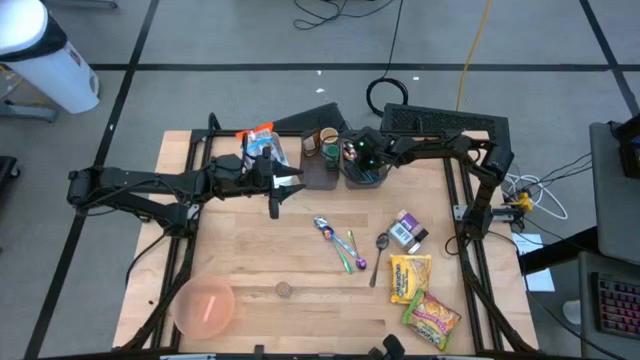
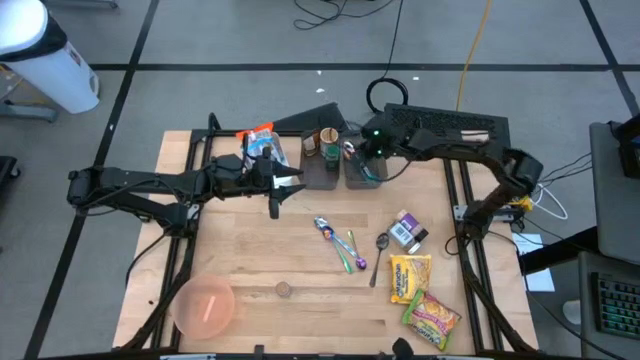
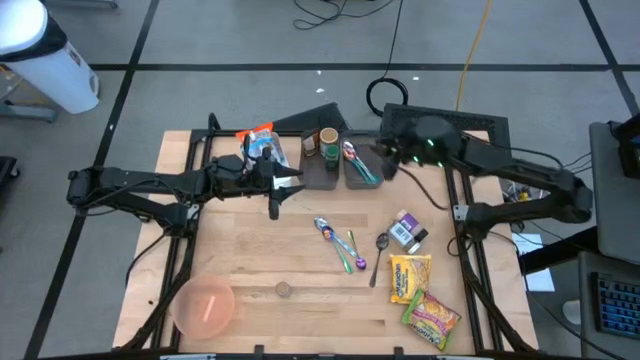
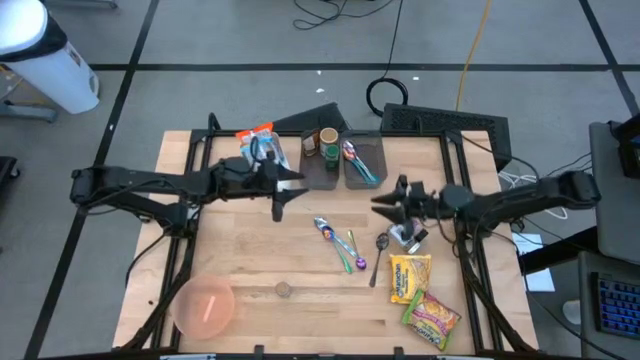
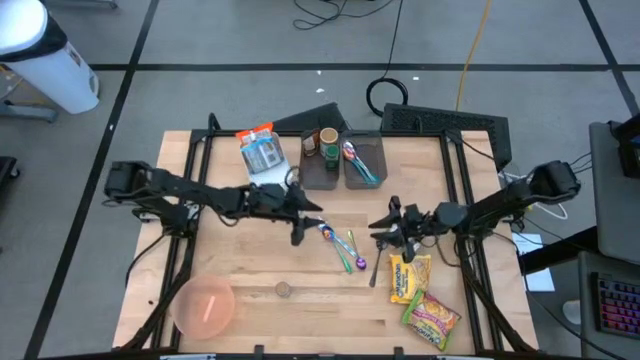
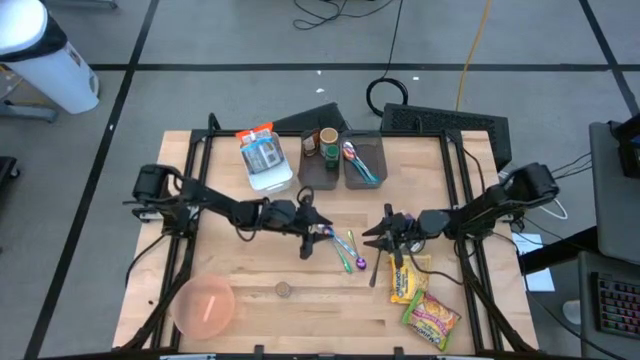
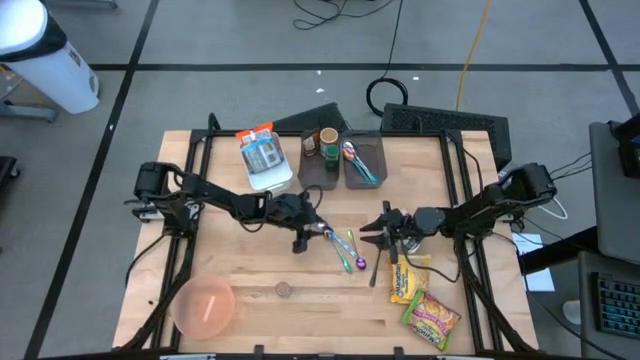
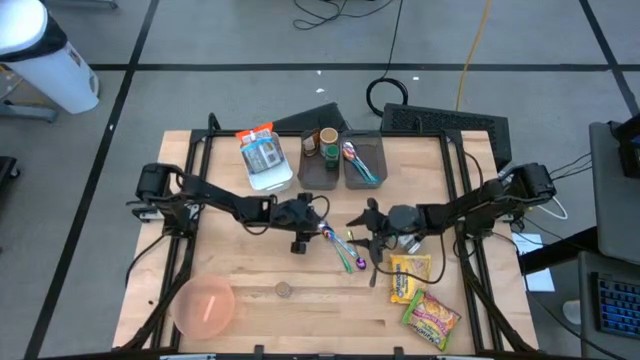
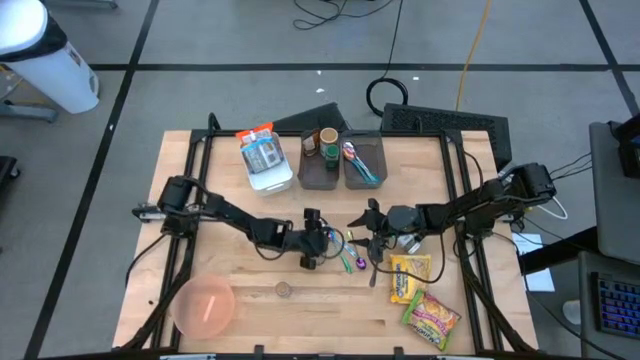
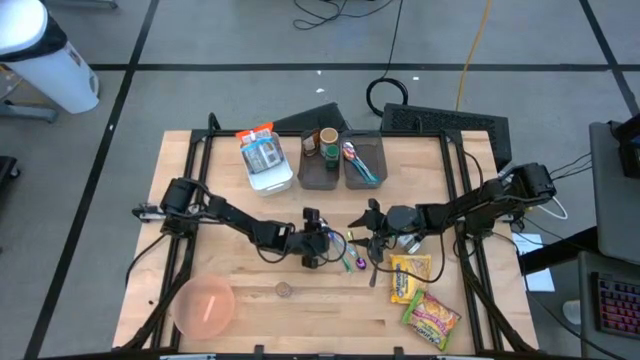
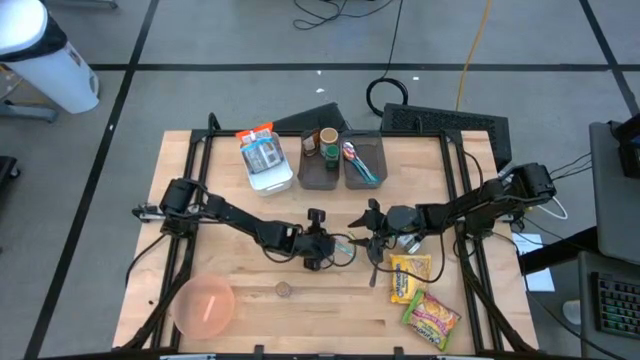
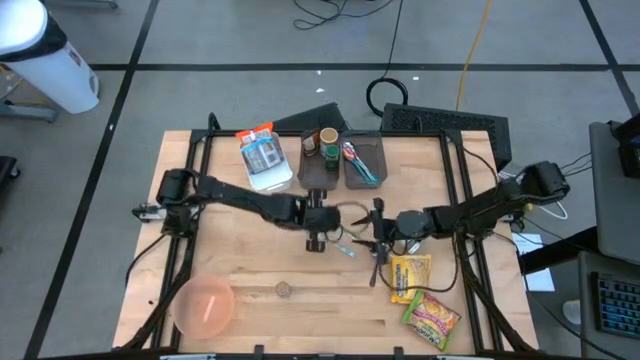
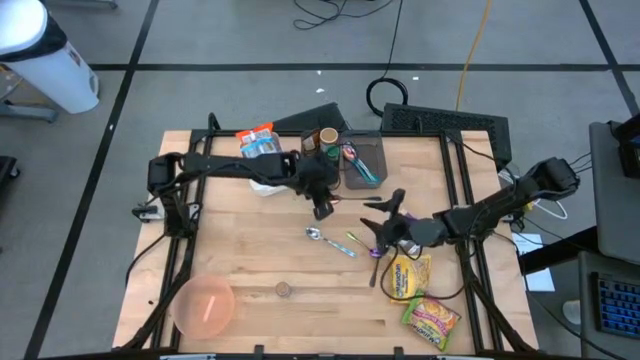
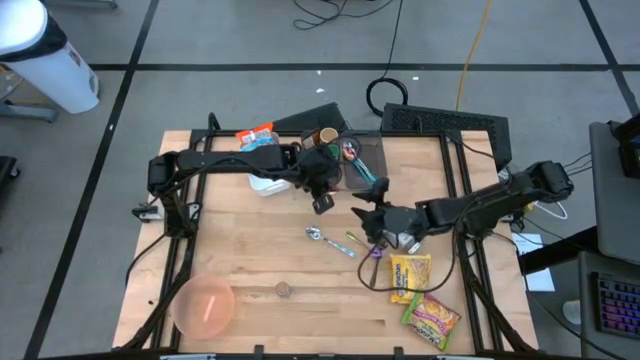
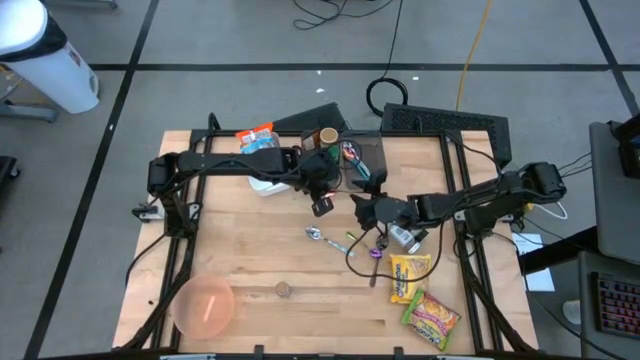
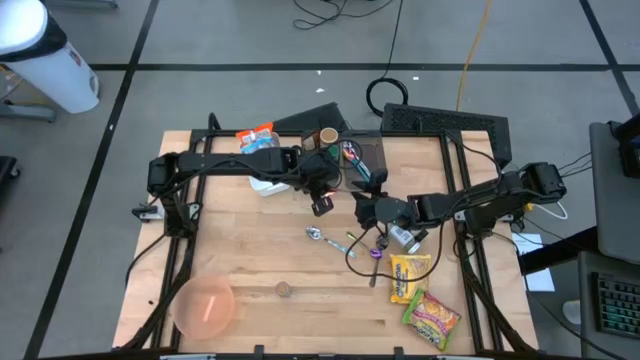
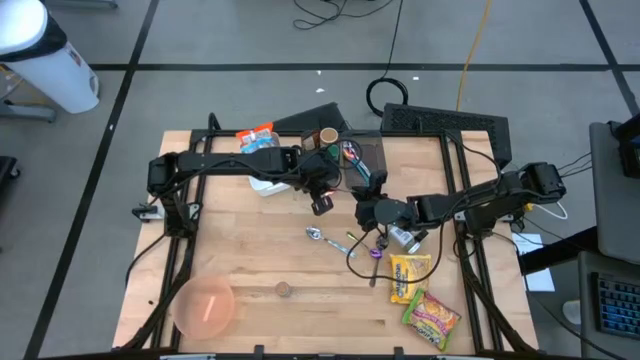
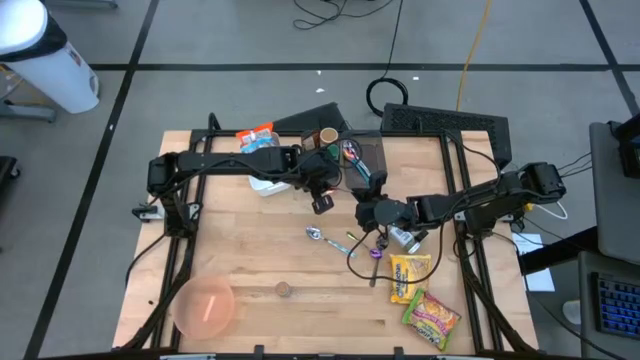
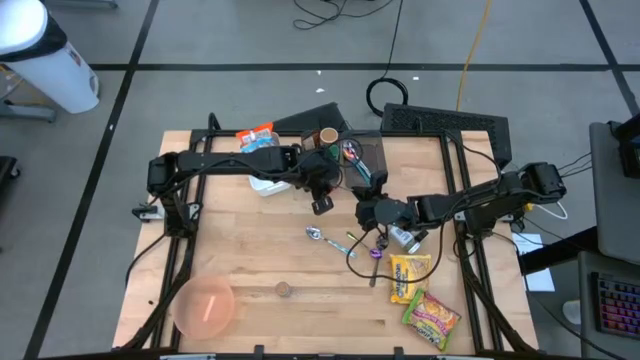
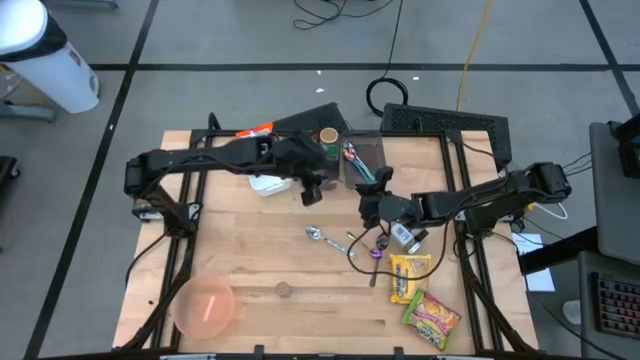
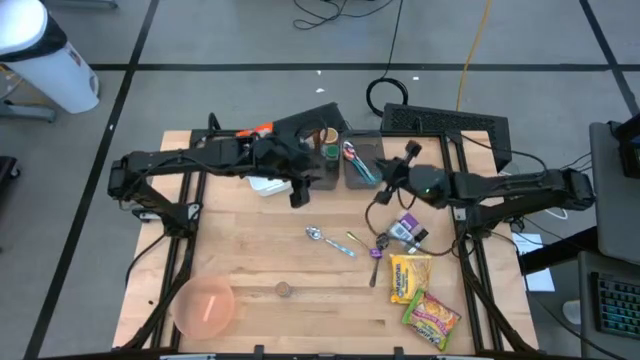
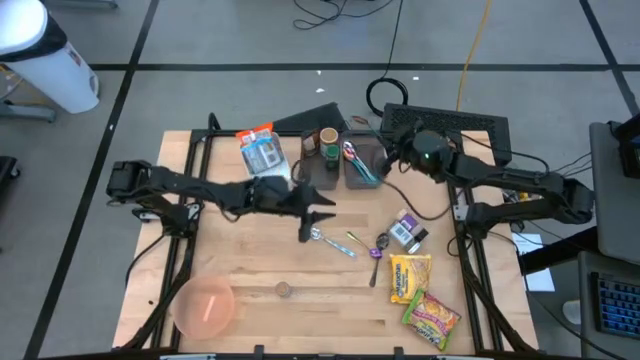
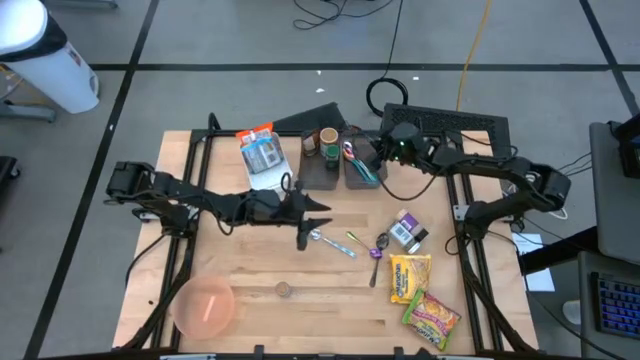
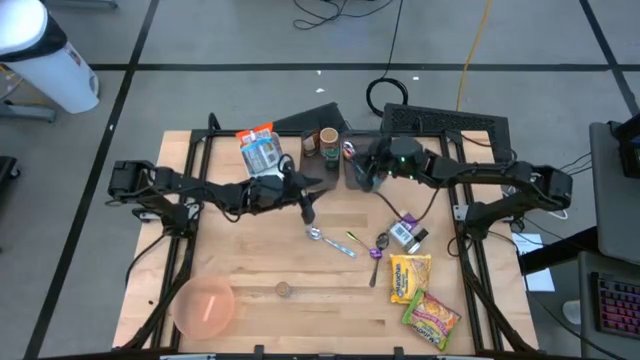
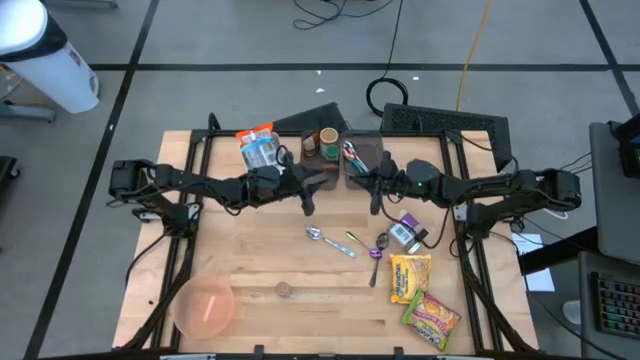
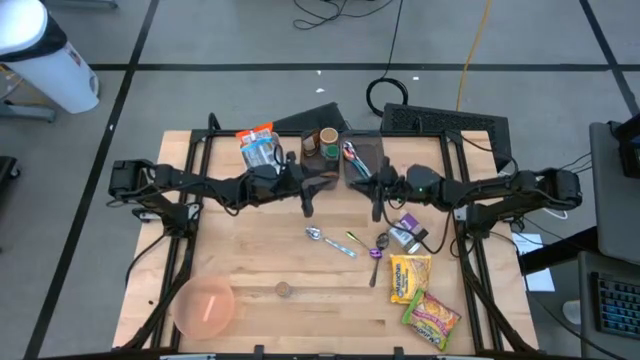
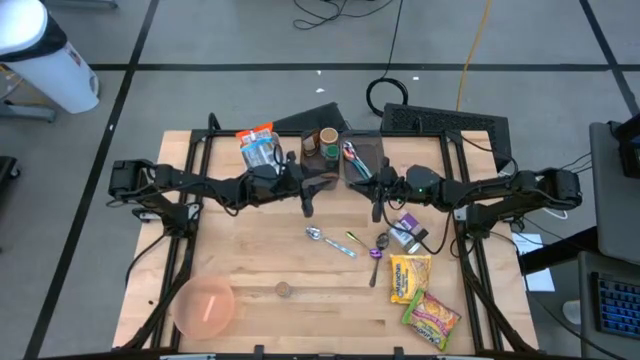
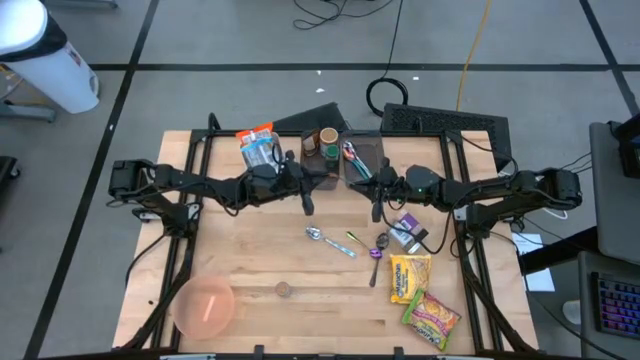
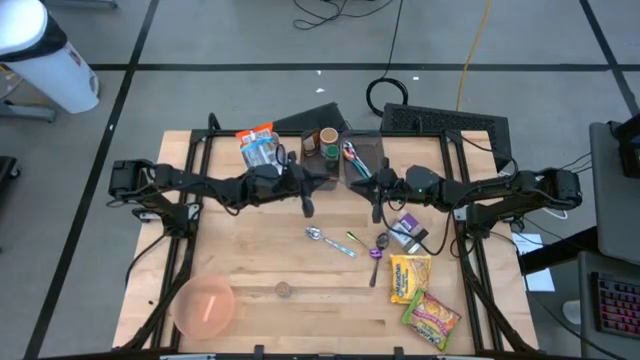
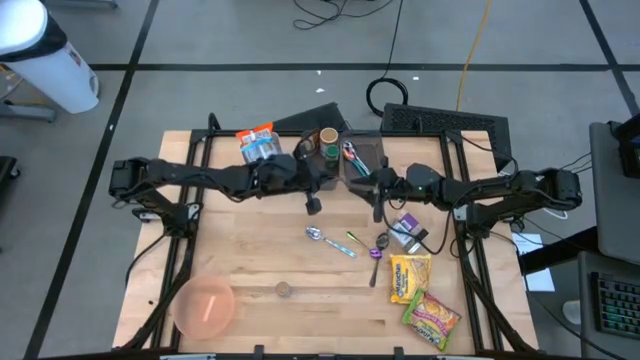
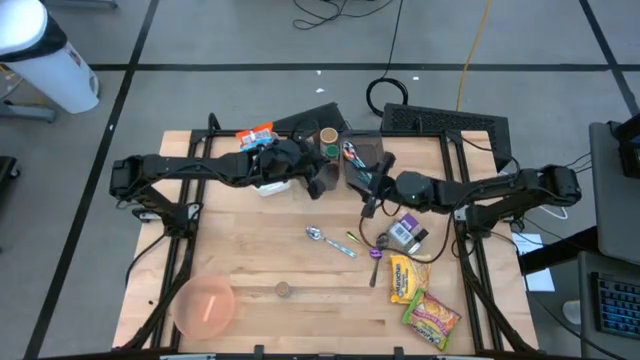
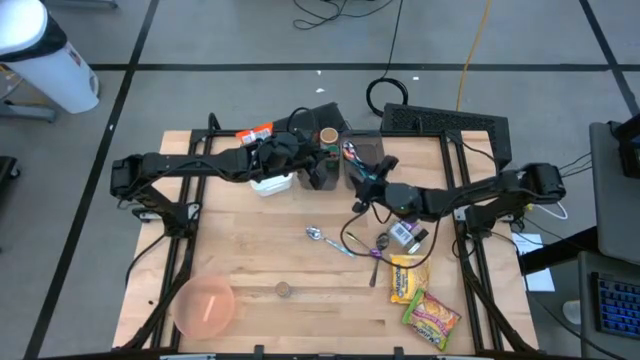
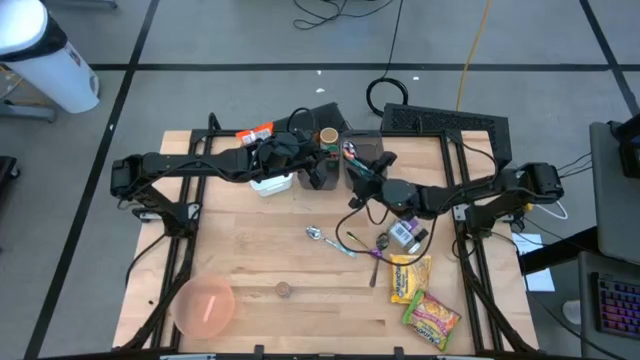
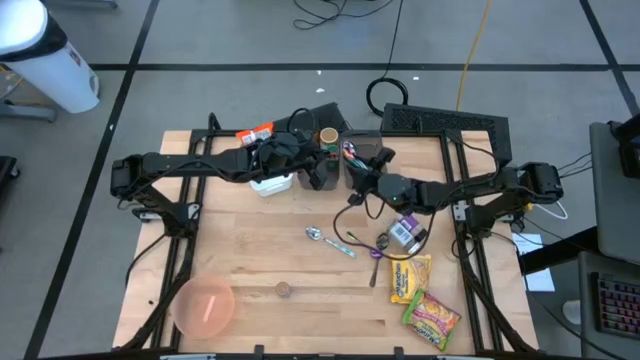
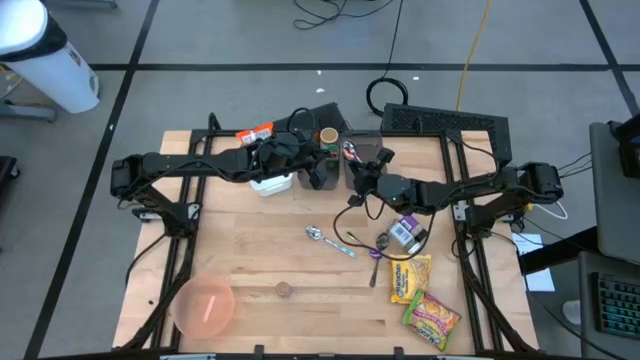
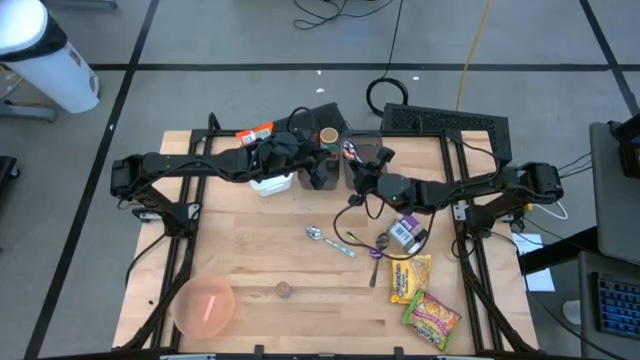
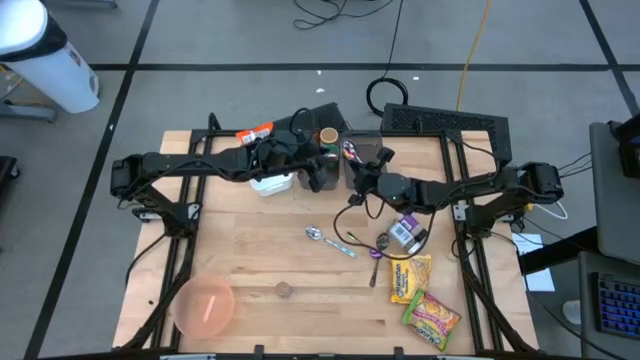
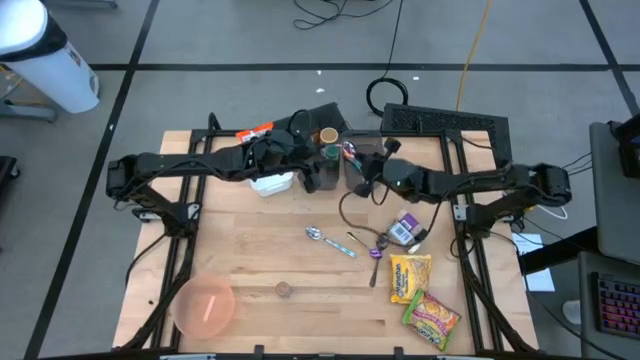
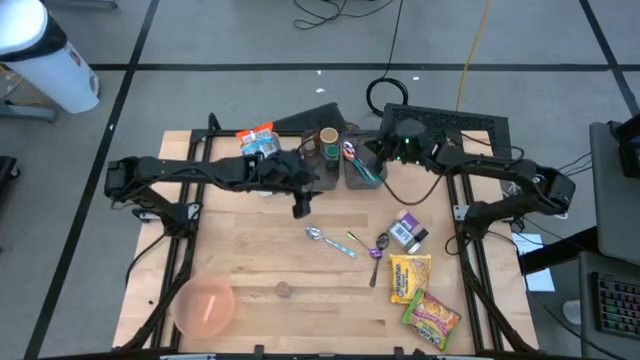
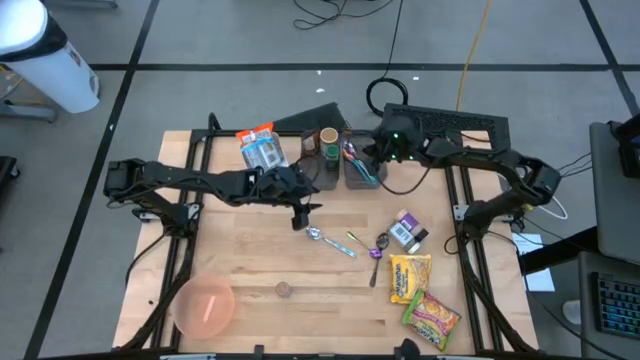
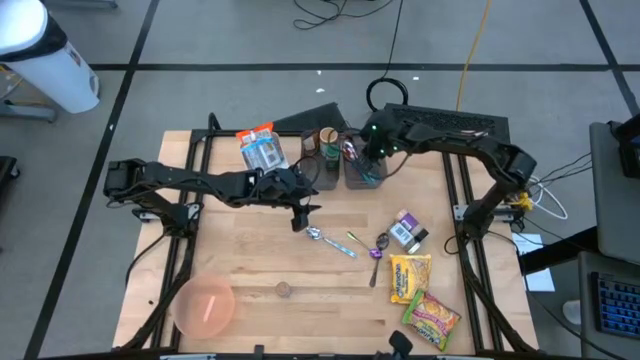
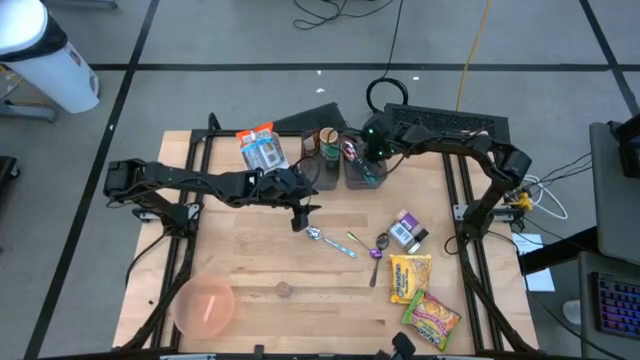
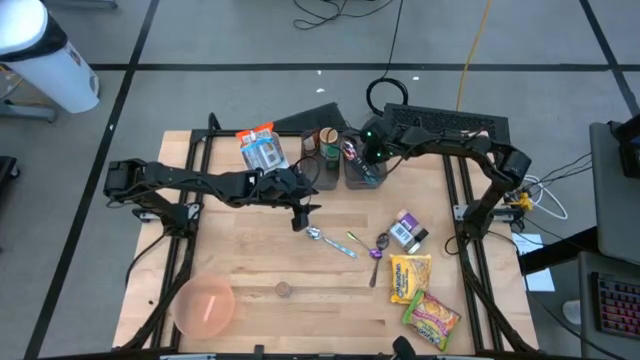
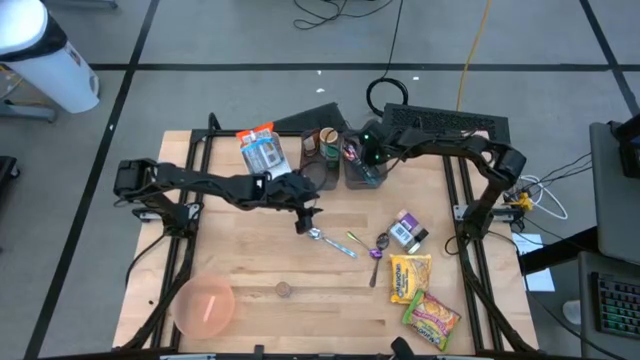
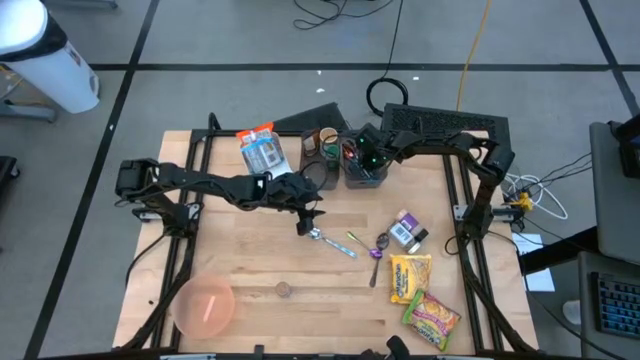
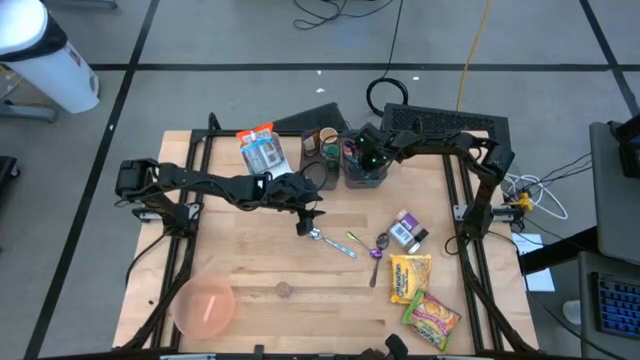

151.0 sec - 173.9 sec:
Task: Pick & Place Food Item
Put the left purple spoon into the right black bin

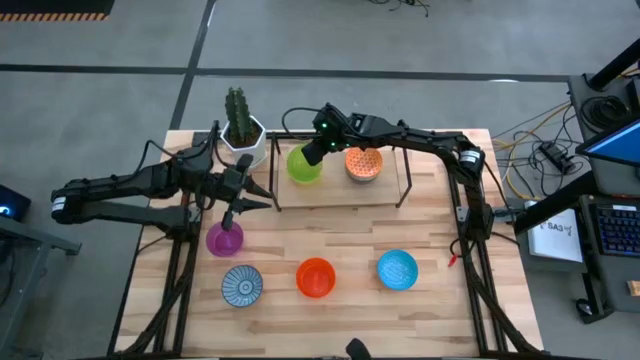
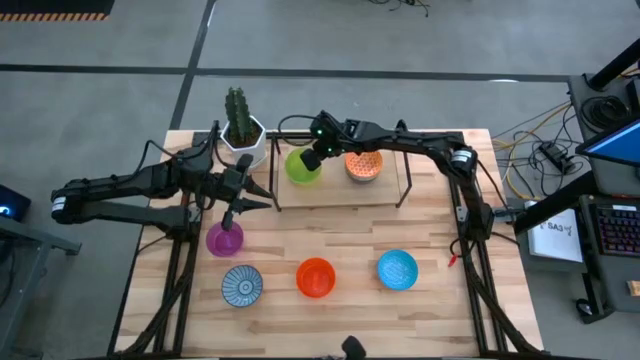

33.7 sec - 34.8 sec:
Task: Place and stack bowls onto a shelf
Adjust the green bowl
